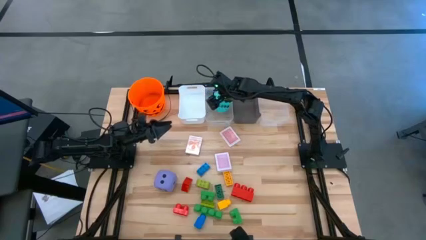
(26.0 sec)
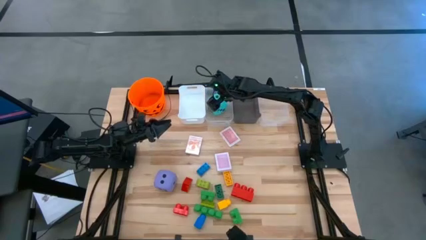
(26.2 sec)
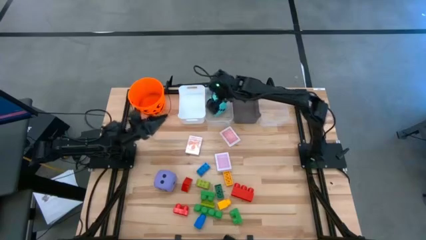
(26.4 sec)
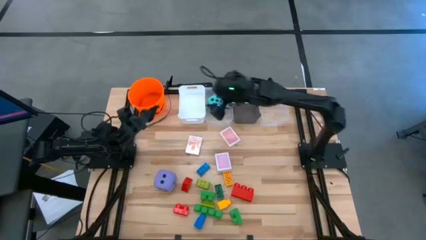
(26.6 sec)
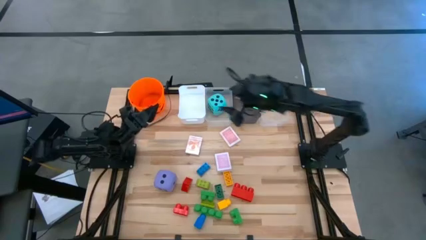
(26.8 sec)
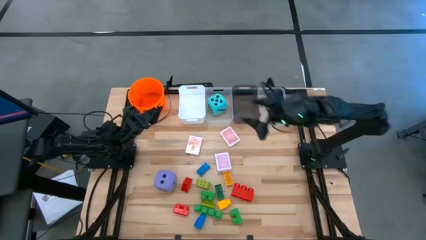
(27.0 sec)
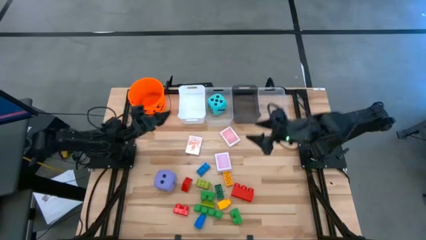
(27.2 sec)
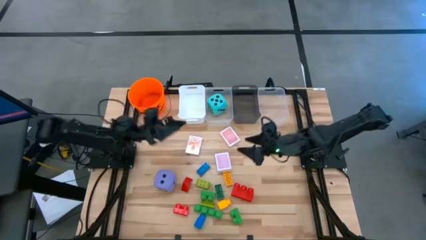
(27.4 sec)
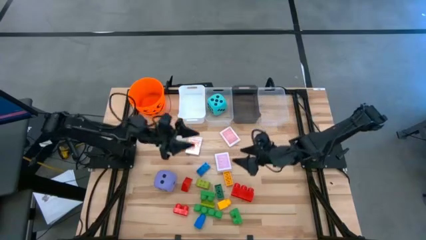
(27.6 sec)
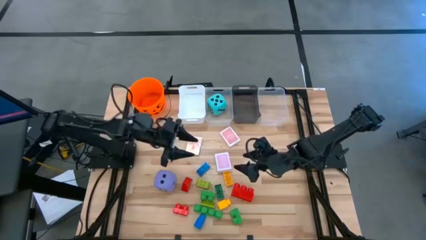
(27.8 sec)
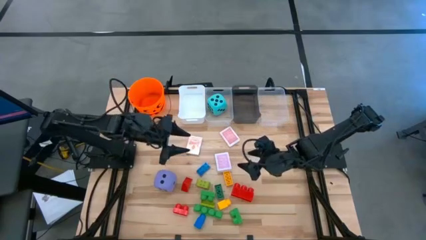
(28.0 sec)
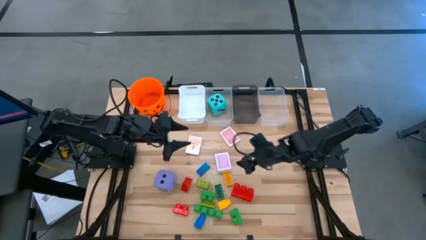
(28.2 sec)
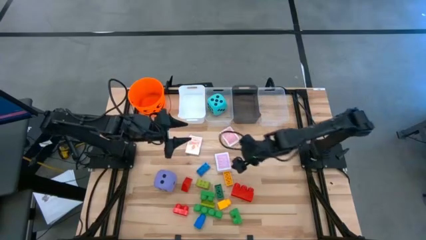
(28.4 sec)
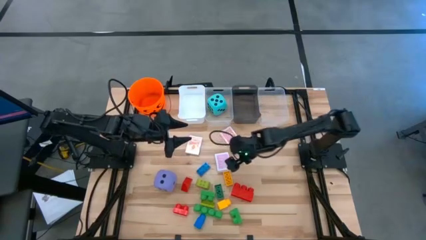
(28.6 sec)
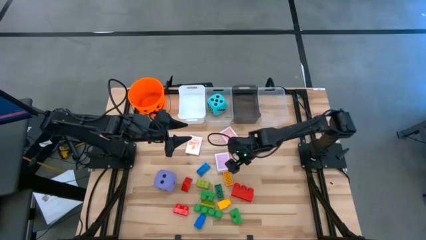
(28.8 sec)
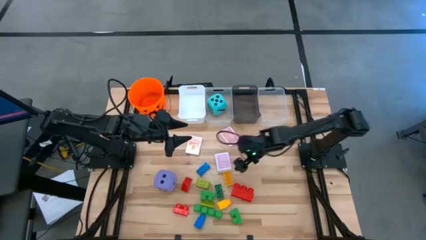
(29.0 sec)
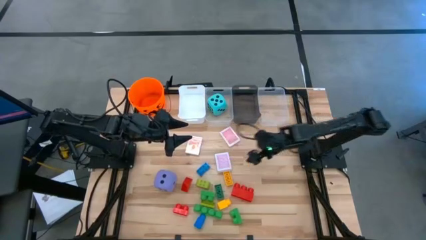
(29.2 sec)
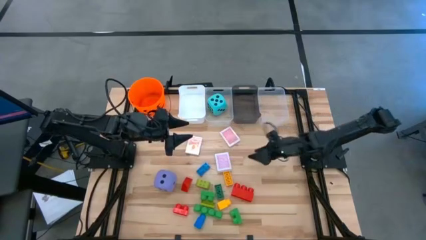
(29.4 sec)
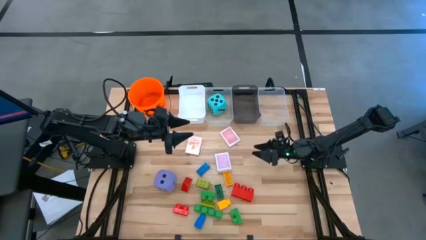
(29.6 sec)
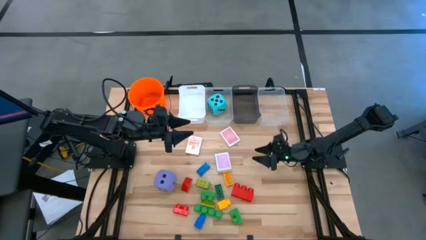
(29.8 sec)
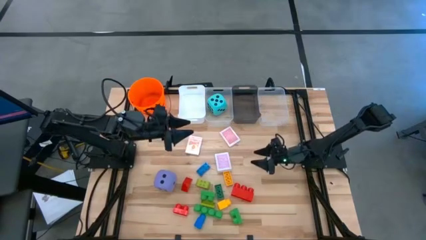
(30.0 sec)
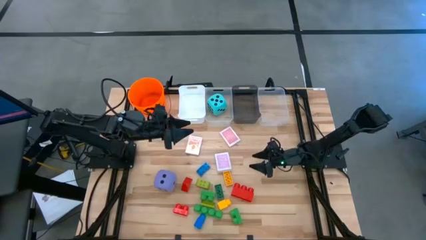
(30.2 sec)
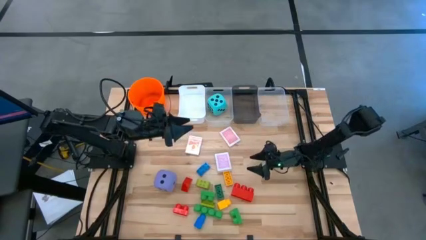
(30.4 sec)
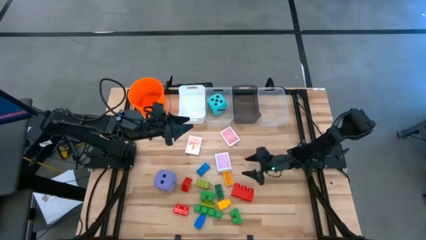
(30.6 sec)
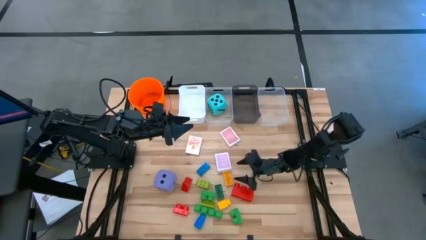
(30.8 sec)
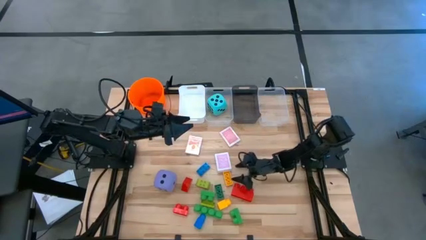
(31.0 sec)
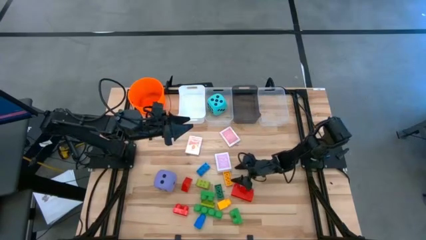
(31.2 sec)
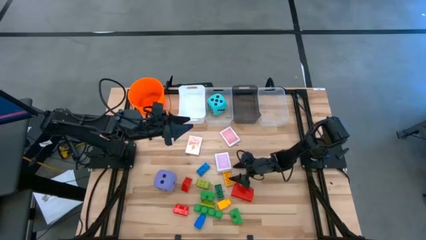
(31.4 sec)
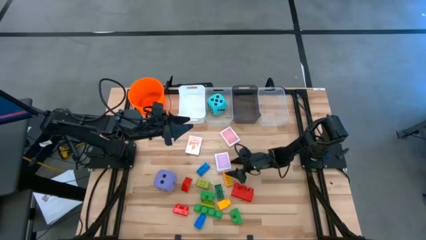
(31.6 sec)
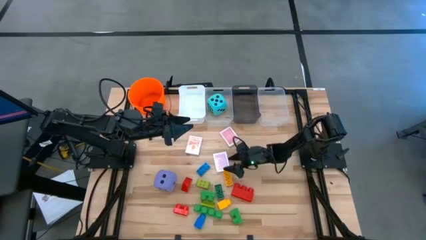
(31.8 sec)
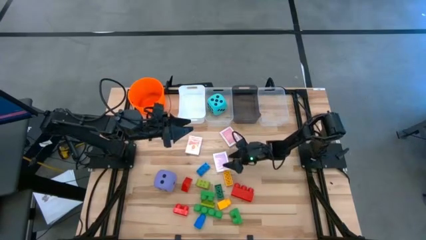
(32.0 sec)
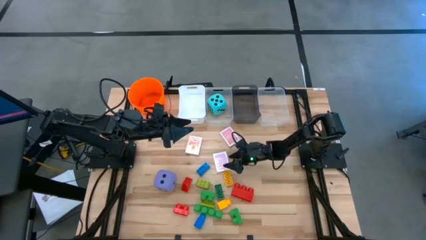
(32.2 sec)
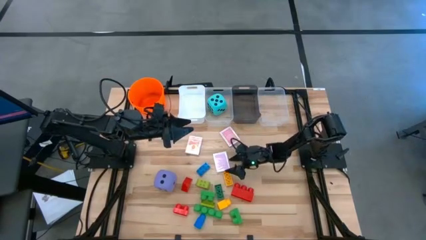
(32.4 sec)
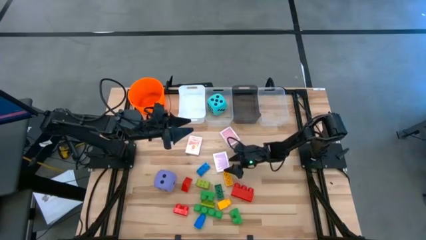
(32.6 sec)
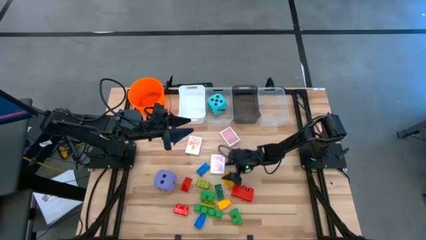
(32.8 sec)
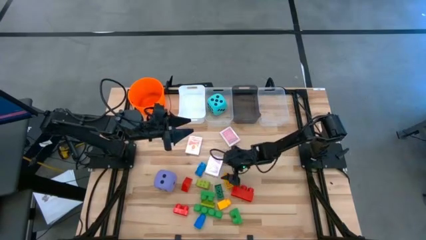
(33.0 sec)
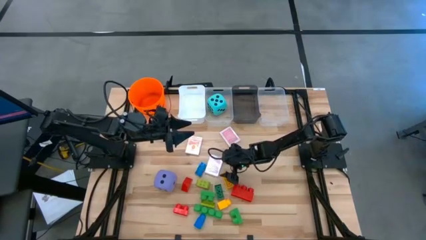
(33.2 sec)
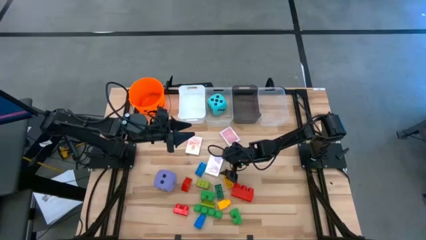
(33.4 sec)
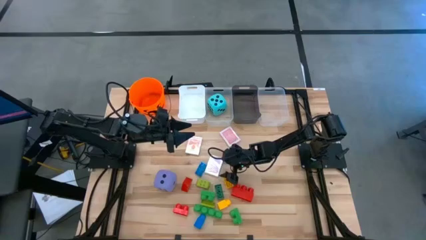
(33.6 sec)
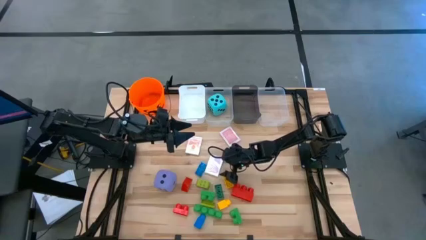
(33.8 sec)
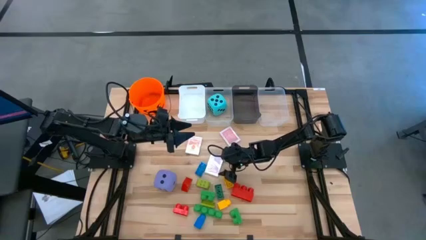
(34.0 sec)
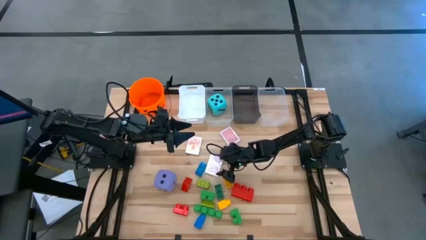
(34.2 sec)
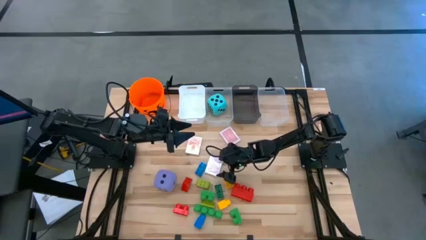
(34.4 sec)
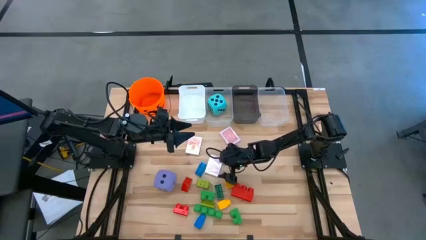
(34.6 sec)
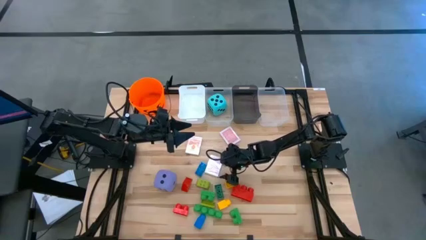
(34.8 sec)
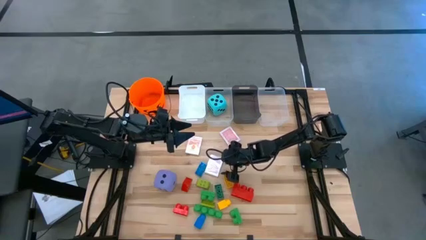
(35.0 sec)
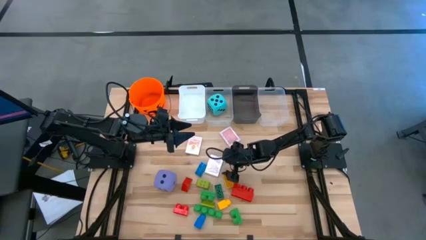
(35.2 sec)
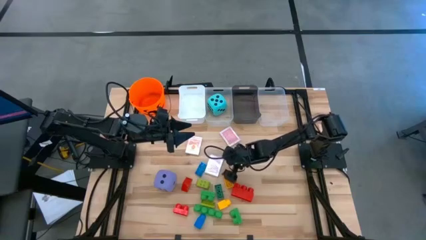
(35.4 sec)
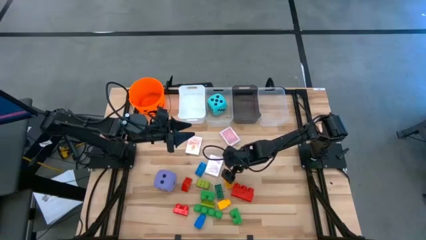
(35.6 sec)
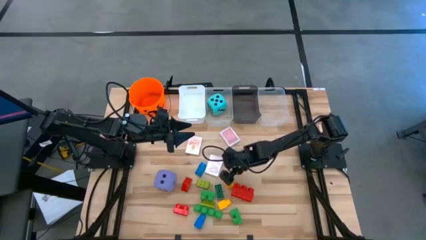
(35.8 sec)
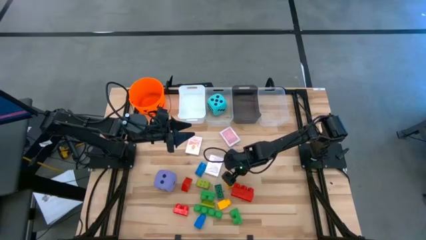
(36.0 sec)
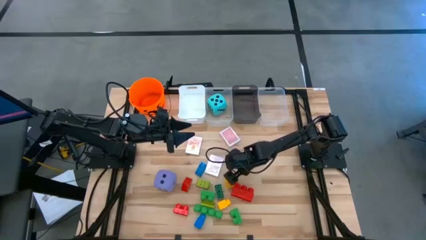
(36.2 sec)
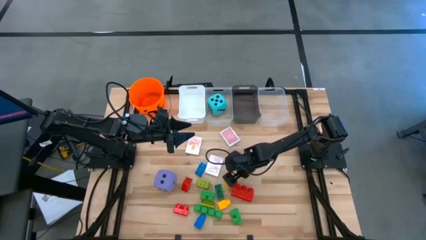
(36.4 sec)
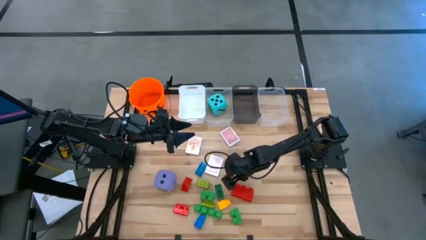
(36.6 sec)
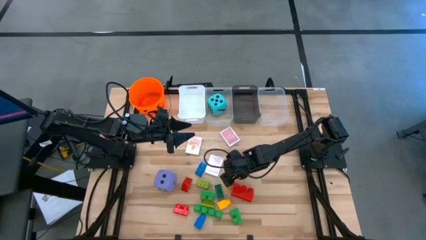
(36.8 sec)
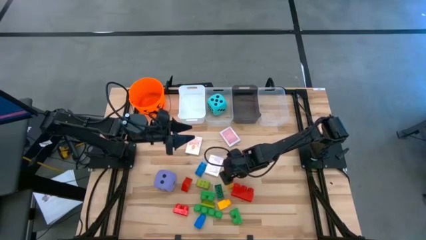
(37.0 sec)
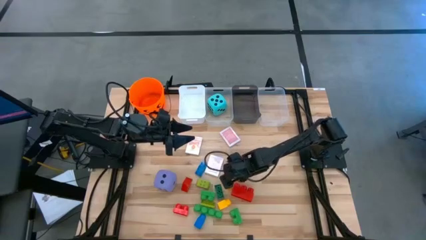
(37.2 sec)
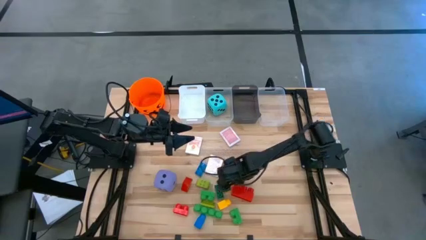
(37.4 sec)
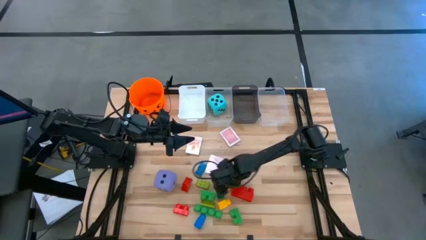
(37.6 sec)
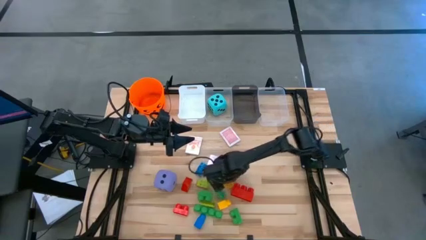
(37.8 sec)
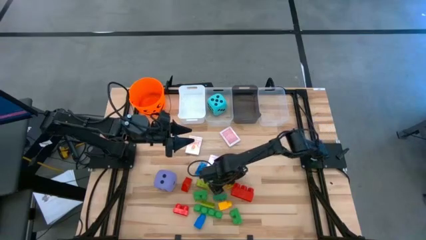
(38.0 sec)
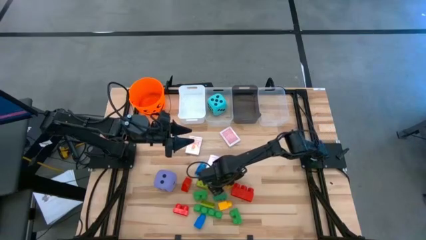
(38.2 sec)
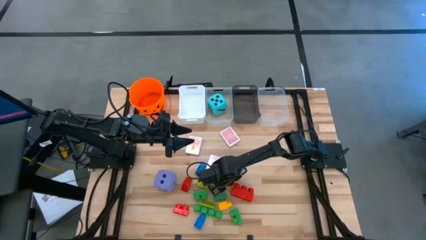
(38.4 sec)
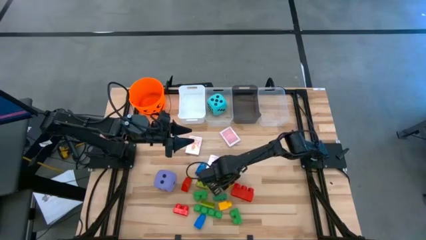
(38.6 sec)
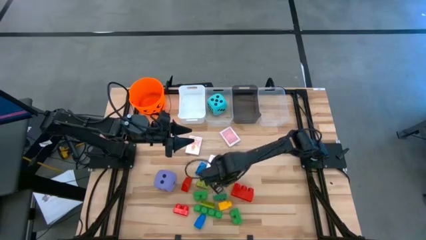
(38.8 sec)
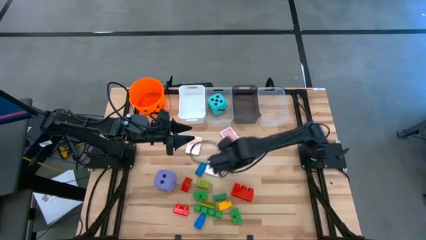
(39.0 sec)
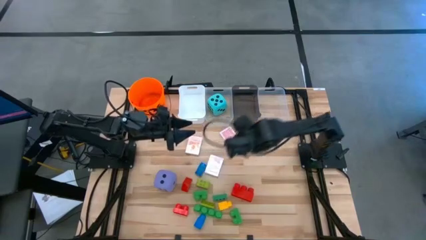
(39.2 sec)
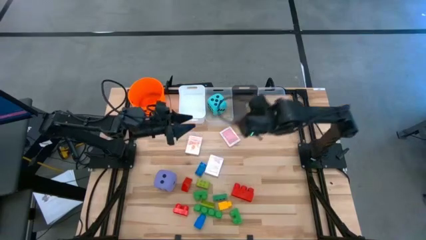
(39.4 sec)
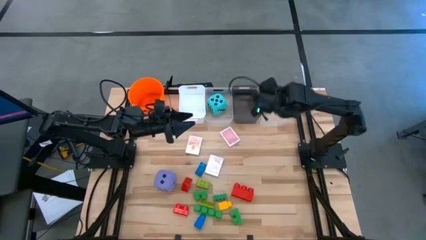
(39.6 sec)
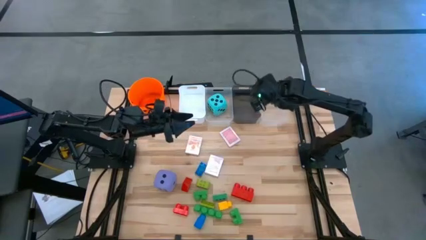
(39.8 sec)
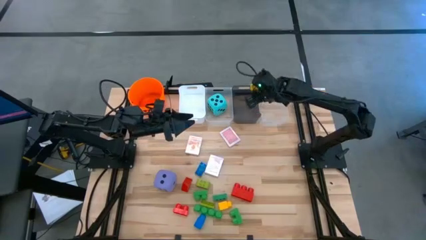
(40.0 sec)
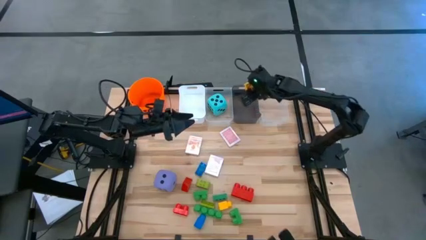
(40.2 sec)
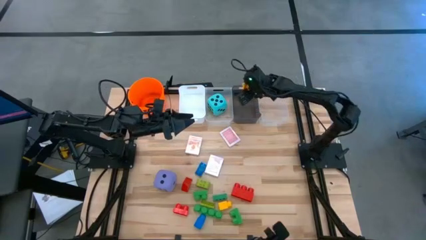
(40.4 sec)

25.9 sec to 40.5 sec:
Task: Pick & Place Toys
Put the small yellow game piece into the black bin
